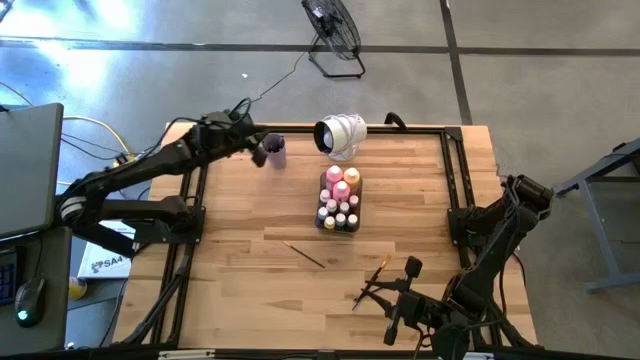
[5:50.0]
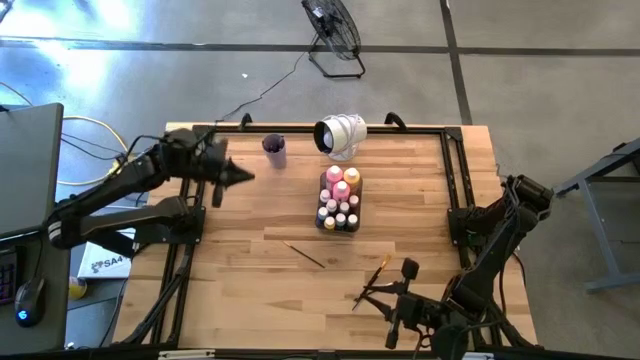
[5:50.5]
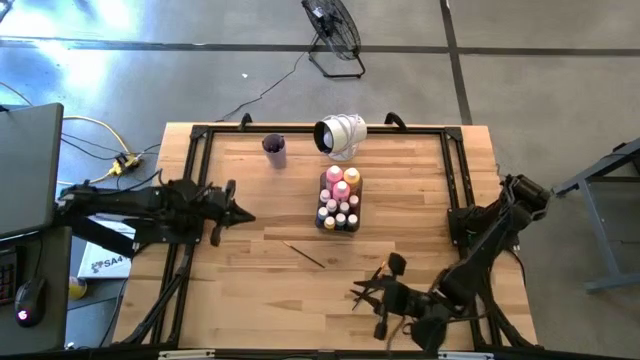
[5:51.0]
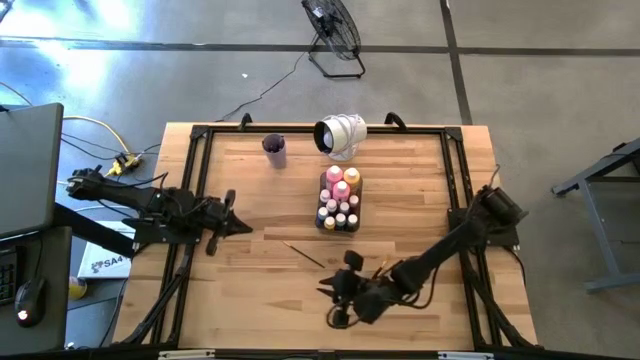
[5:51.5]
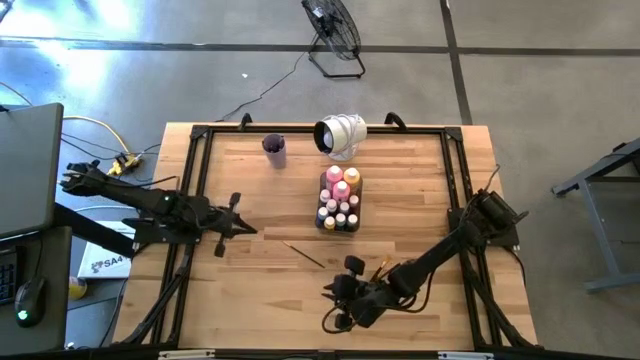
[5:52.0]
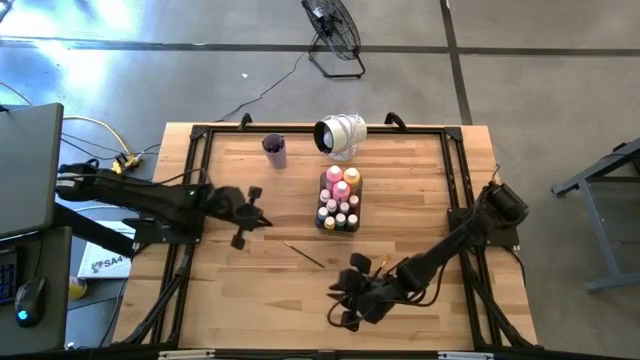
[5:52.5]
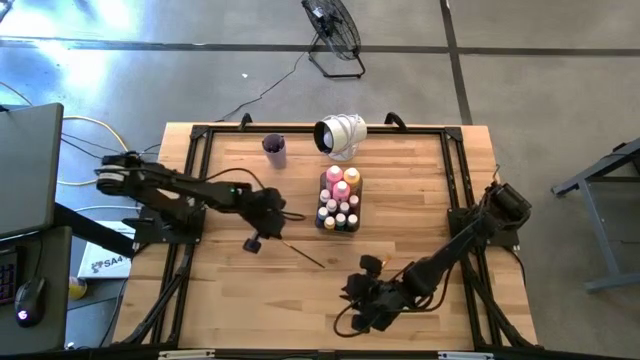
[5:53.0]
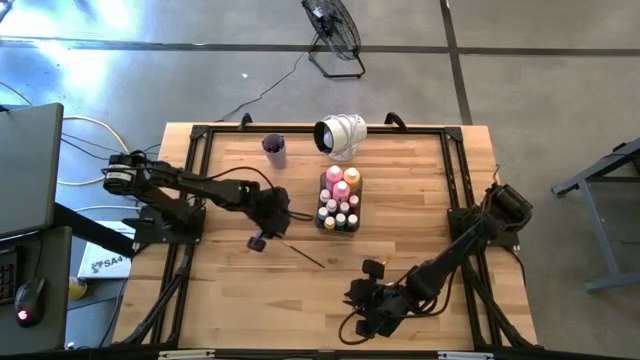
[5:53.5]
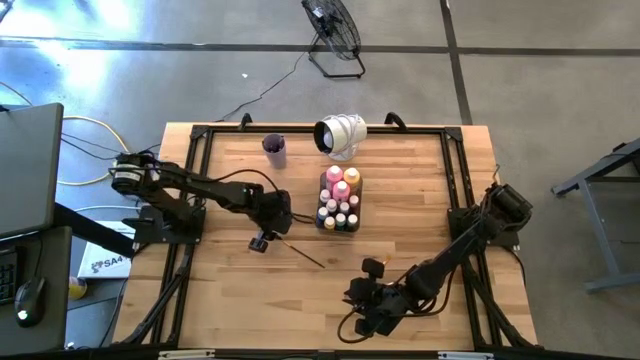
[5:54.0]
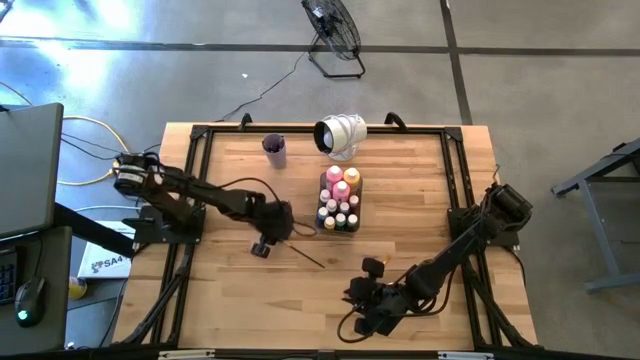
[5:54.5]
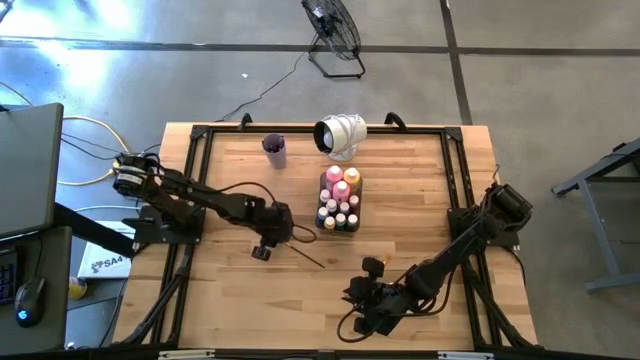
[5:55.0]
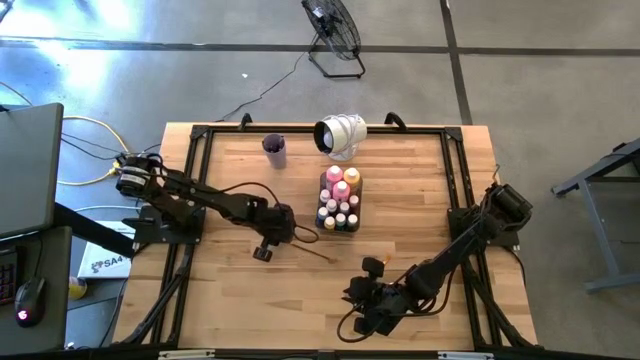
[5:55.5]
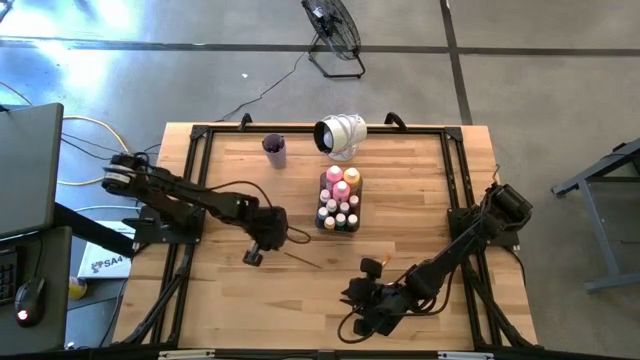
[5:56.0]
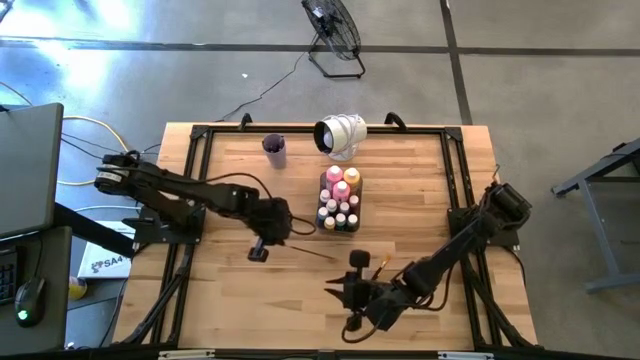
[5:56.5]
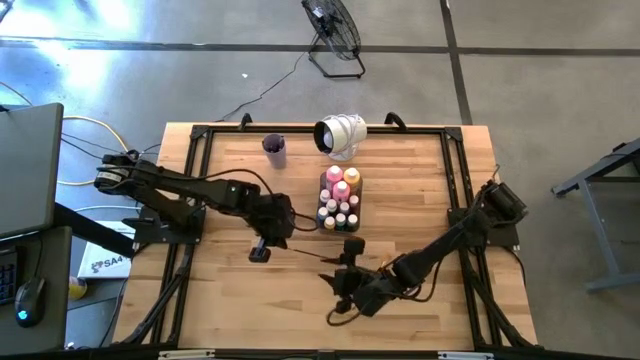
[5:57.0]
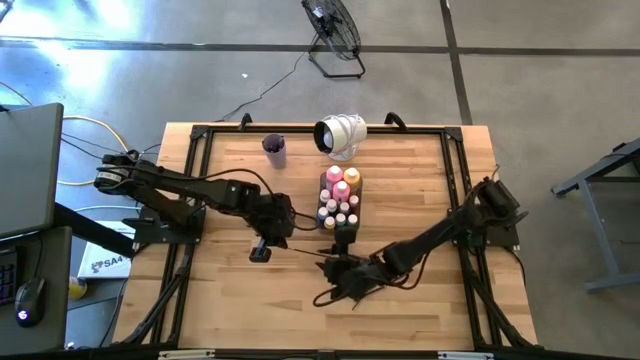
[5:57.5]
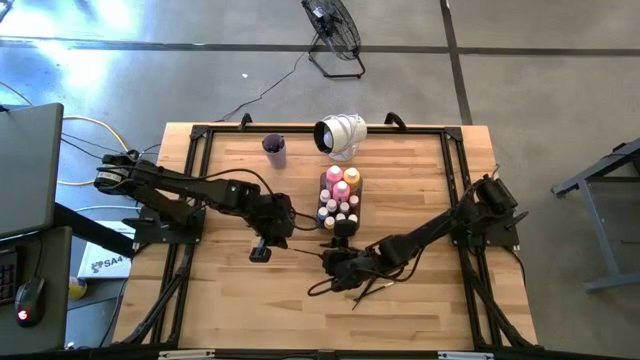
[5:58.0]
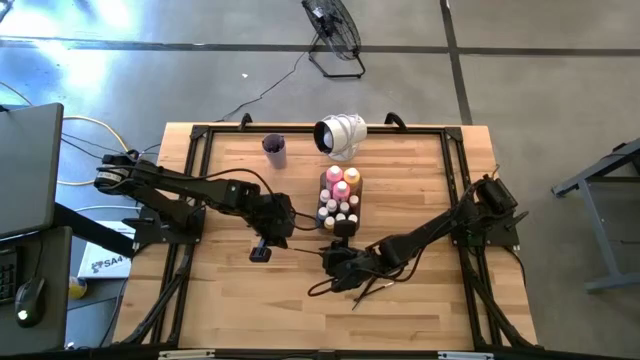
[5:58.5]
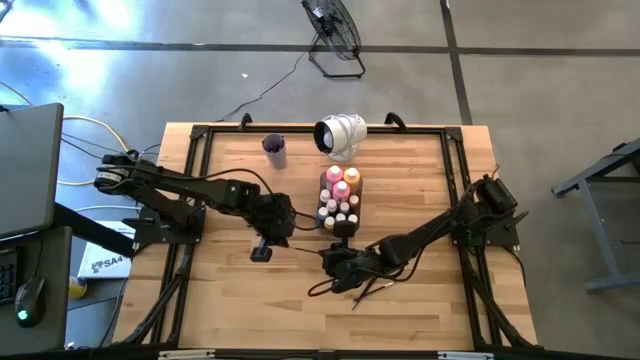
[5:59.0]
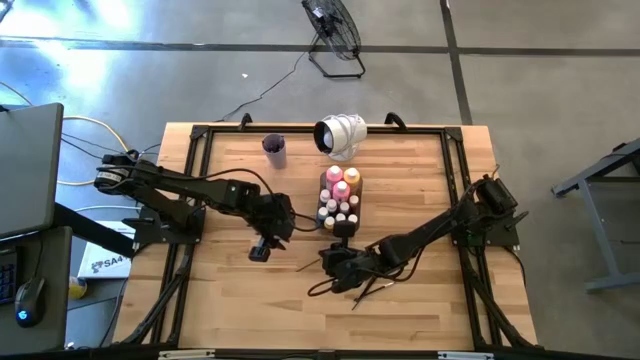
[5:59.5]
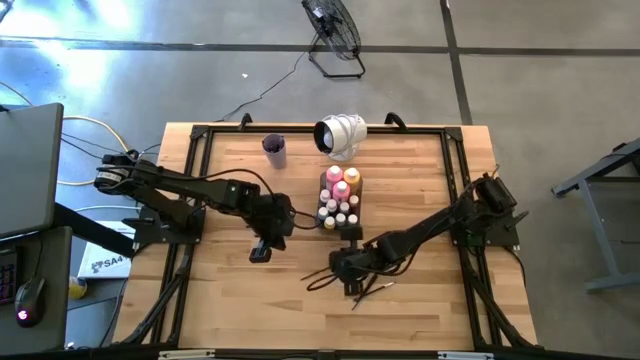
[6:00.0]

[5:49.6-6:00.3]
Task: Pick & Place Paint Supplies
Put the gold paint brush into the violet cup

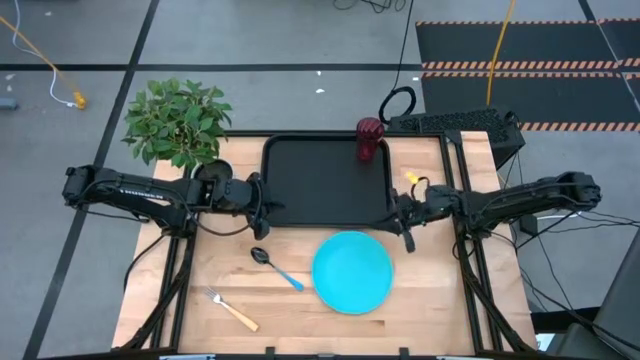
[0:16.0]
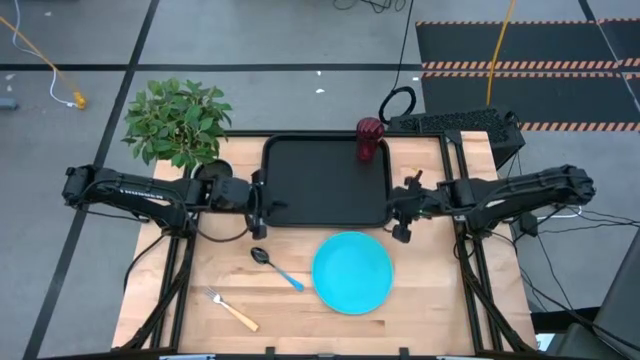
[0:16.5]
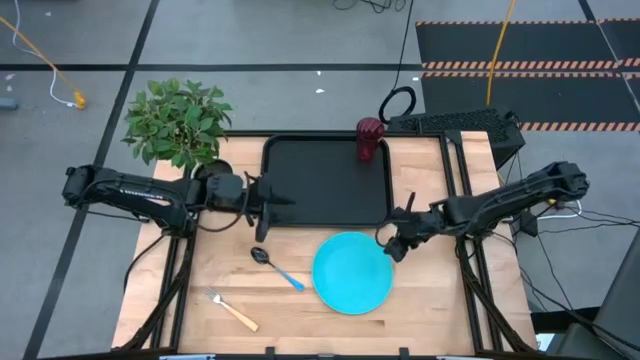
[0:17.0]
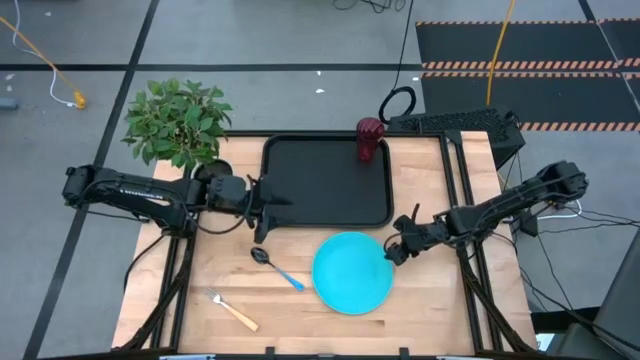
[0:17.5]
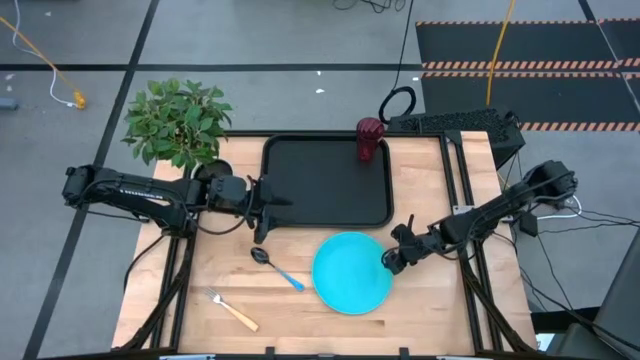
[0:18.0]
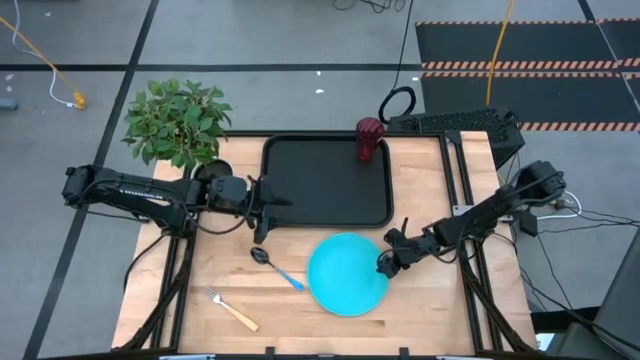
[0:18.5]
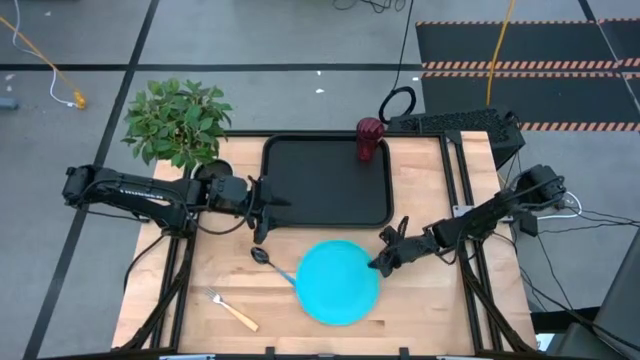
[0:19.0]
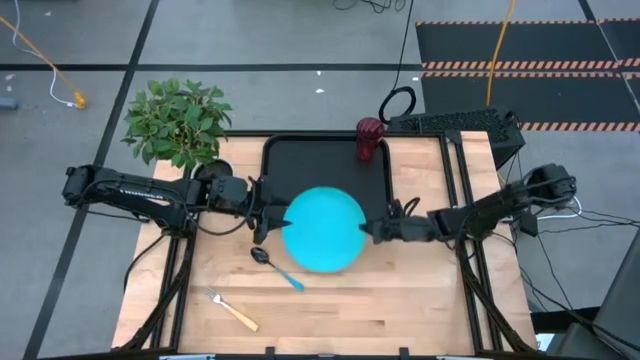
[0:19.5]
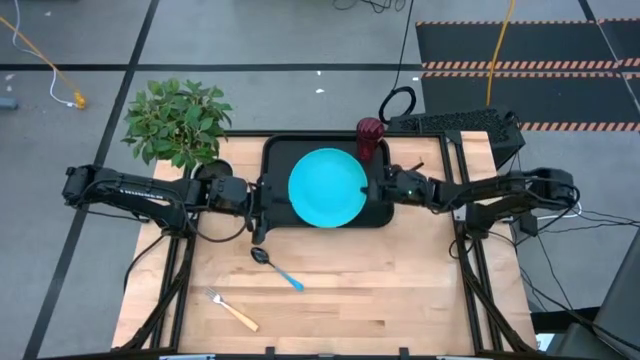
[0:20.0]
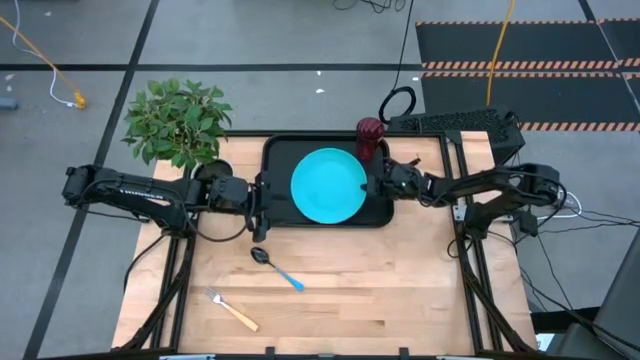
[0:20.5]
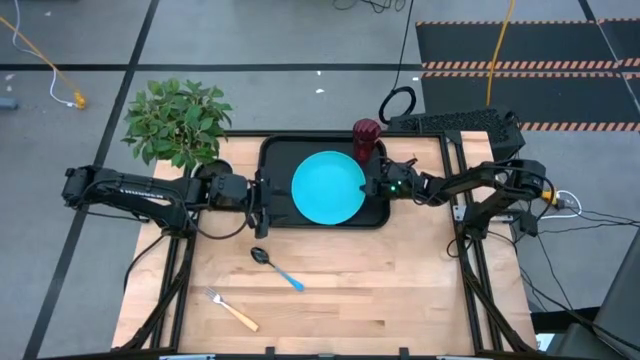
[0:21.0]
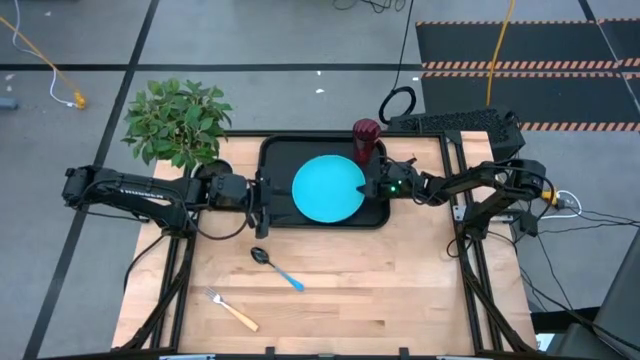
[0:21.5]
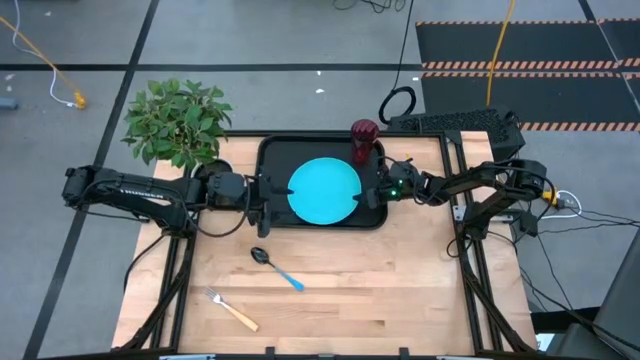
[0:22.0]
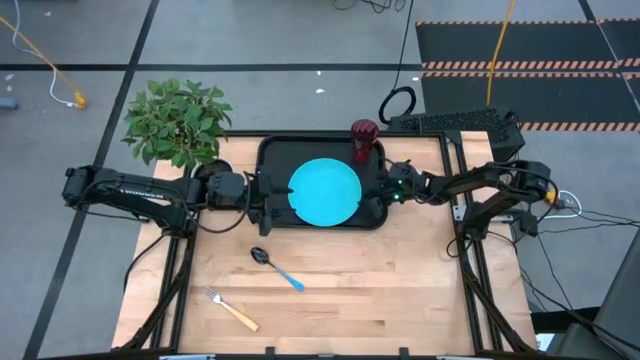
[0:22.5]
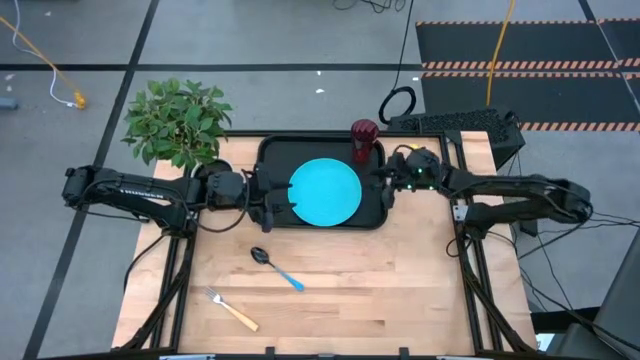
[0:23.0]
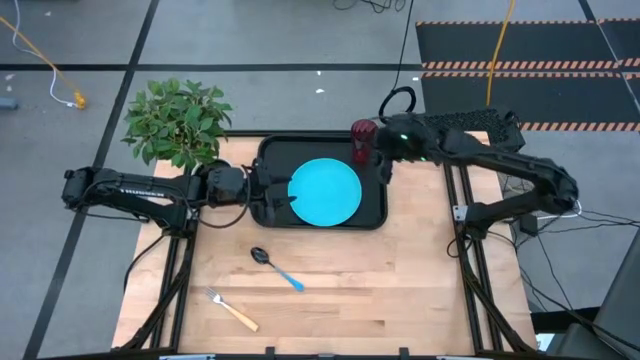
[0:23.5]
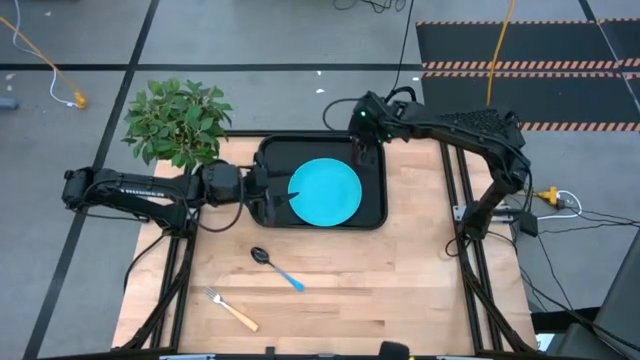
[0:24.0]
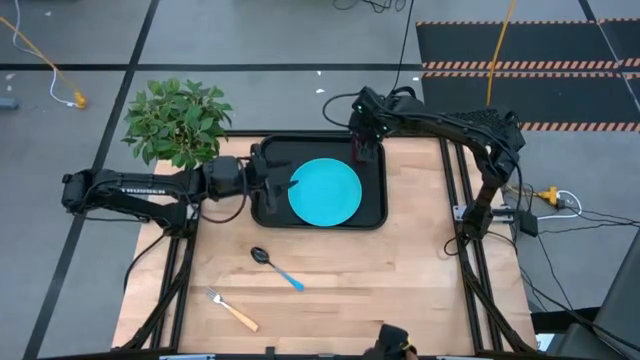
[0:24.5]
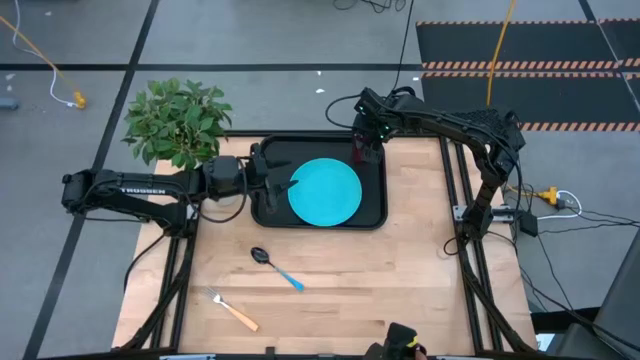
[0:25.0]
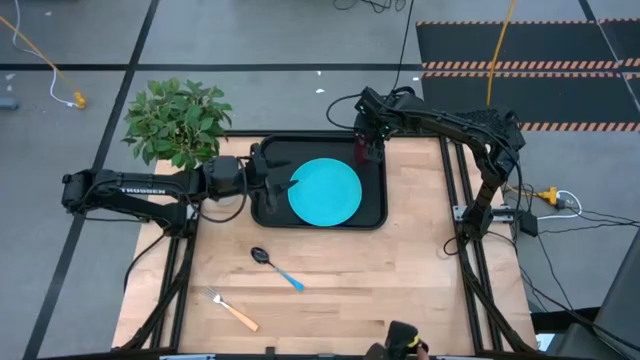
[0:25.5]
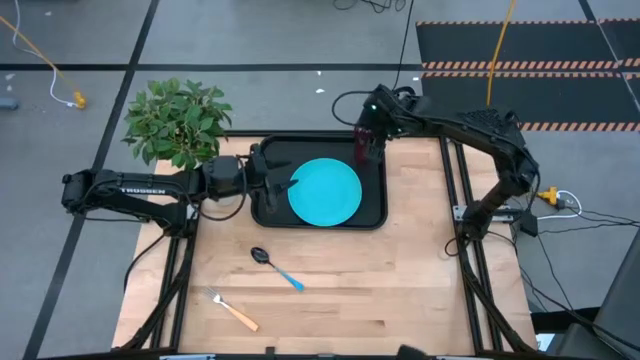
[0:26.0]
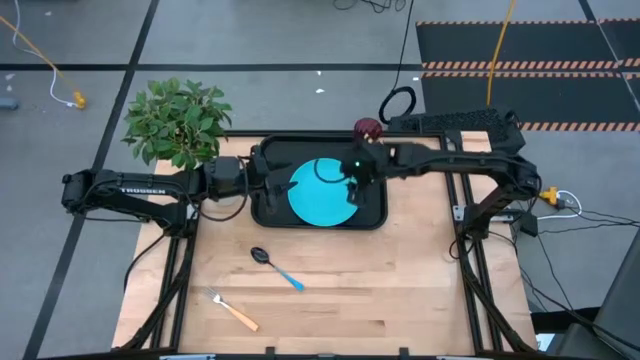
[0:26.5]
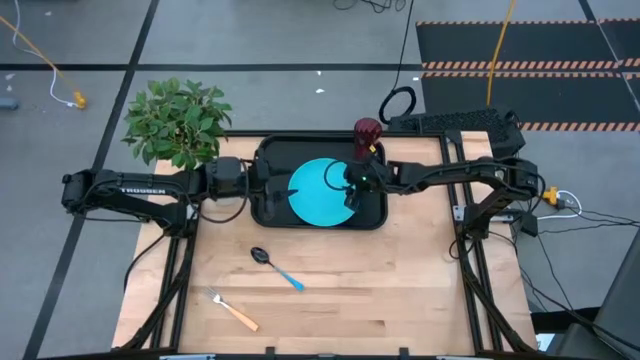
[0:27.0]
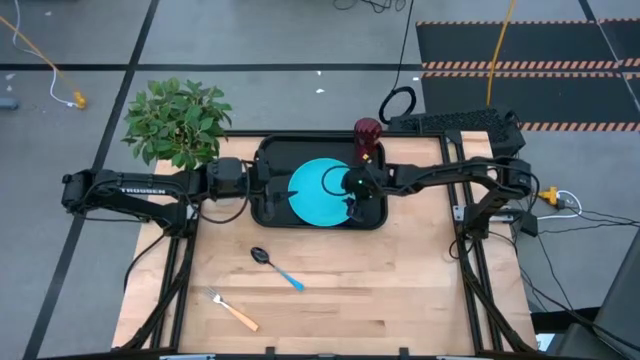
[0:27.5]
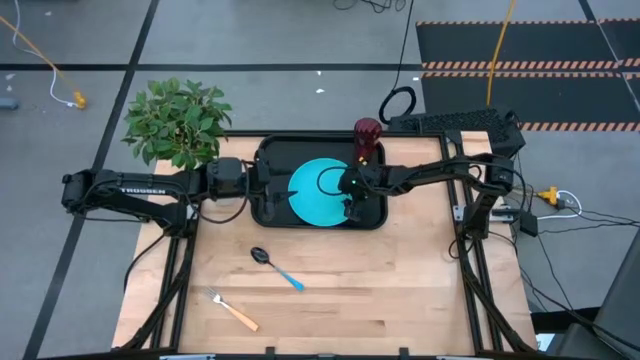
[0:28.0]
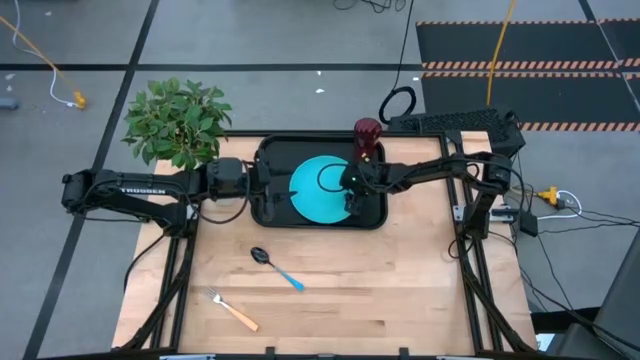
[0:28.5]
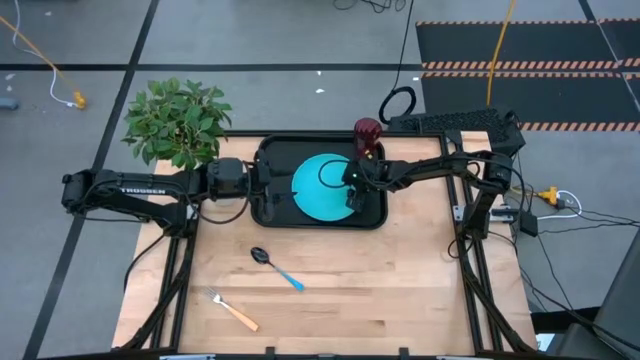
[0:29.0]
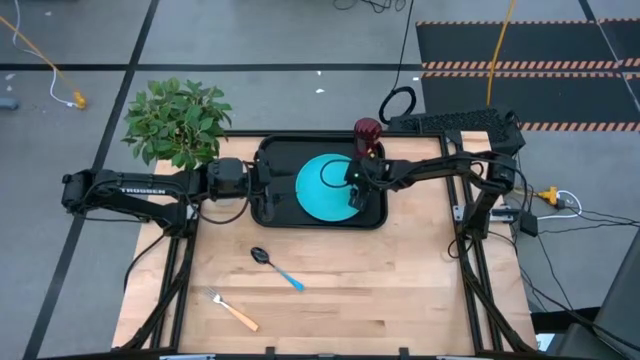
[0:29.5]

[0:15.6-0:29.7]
Task: Pick and place plate/cup/fork/spoon on tray
Put the blue plate on the black serving tray to the bottom right of the red cup
